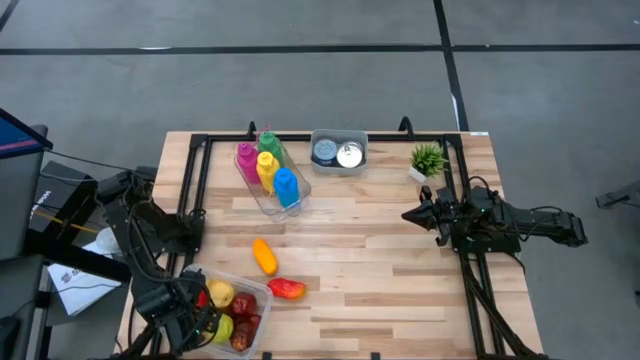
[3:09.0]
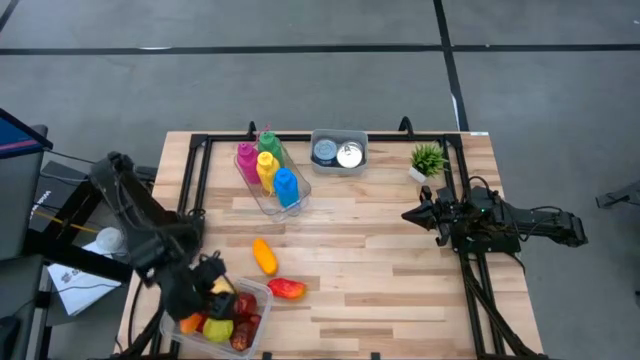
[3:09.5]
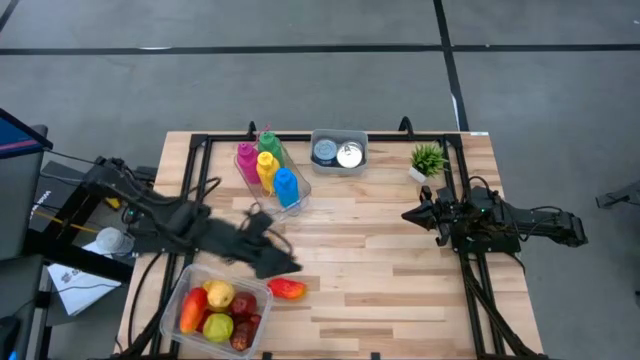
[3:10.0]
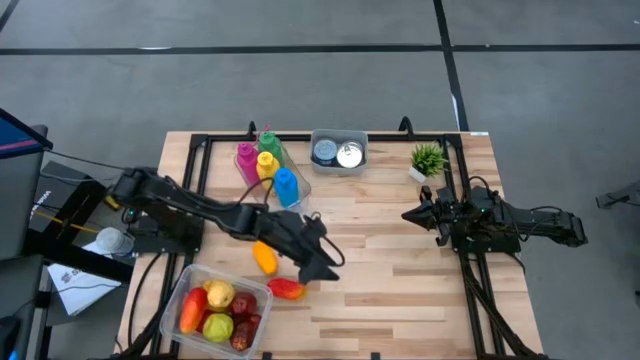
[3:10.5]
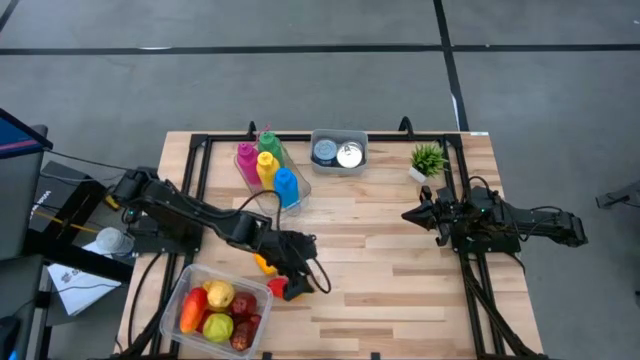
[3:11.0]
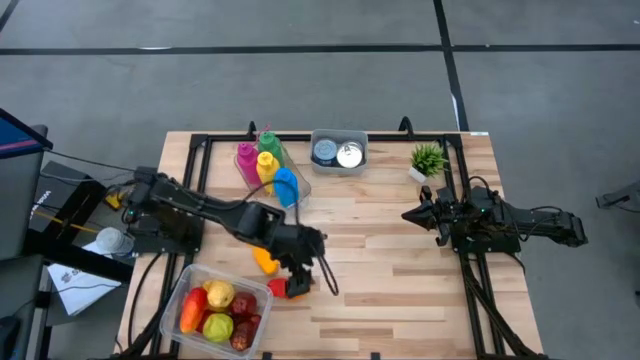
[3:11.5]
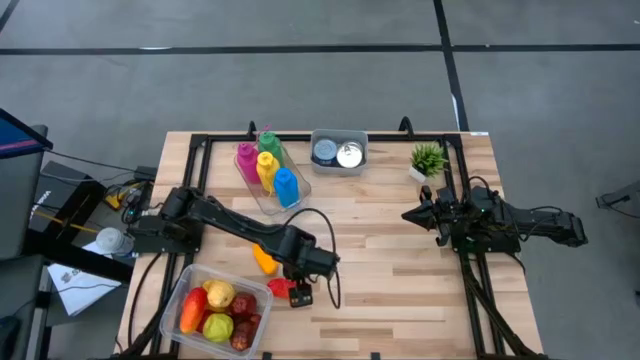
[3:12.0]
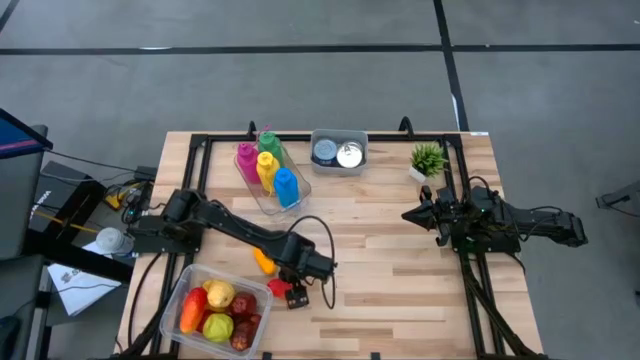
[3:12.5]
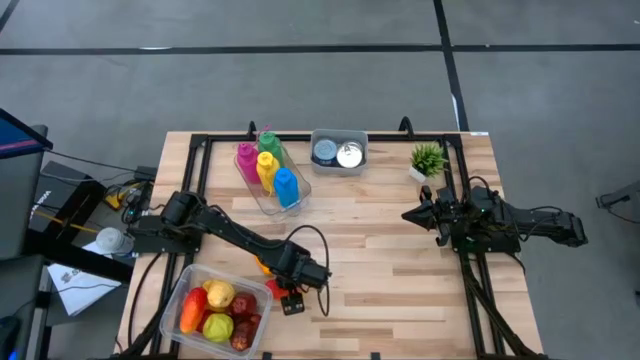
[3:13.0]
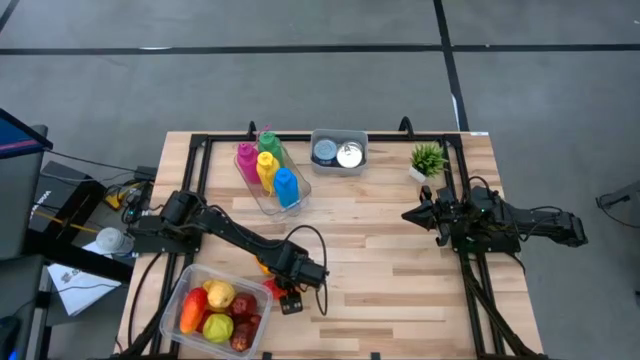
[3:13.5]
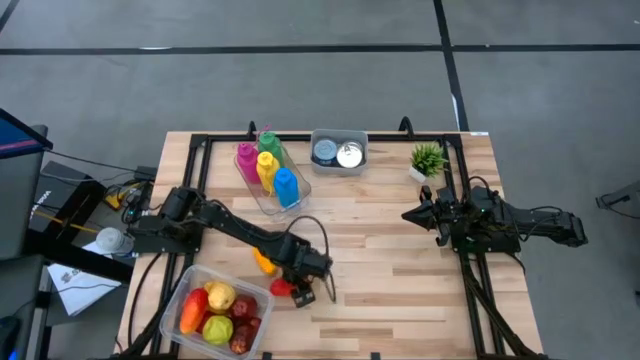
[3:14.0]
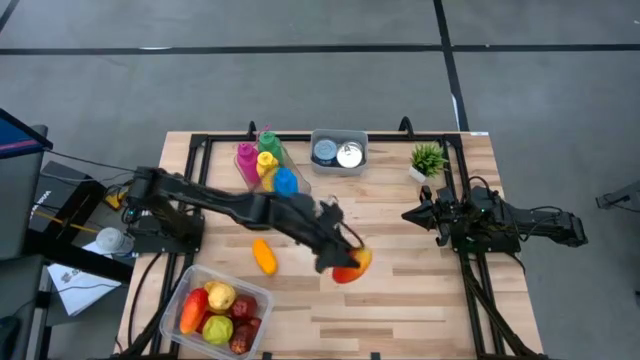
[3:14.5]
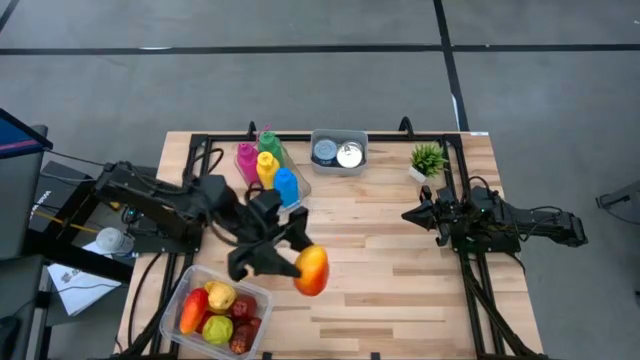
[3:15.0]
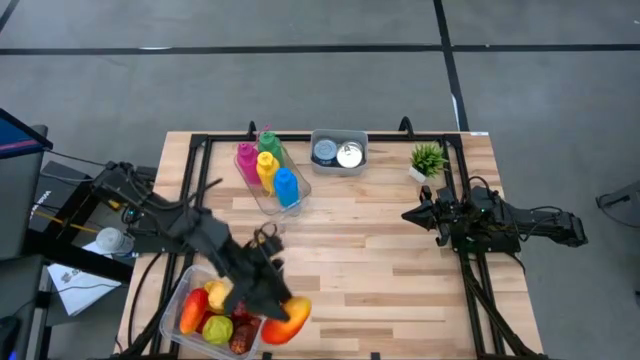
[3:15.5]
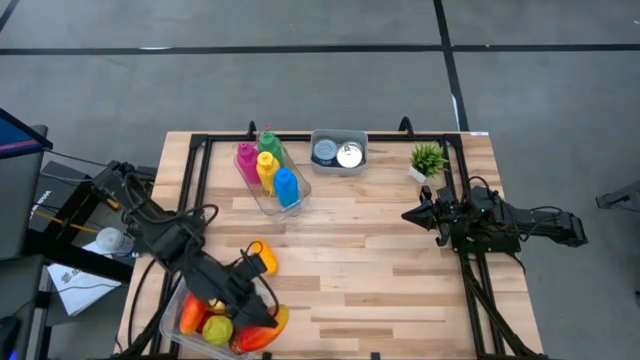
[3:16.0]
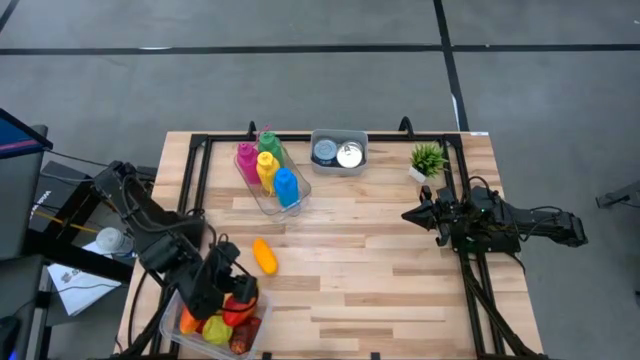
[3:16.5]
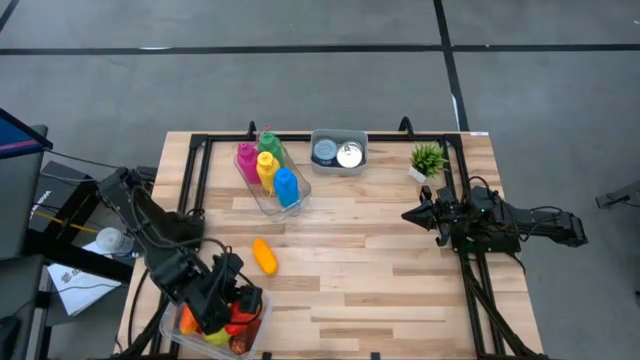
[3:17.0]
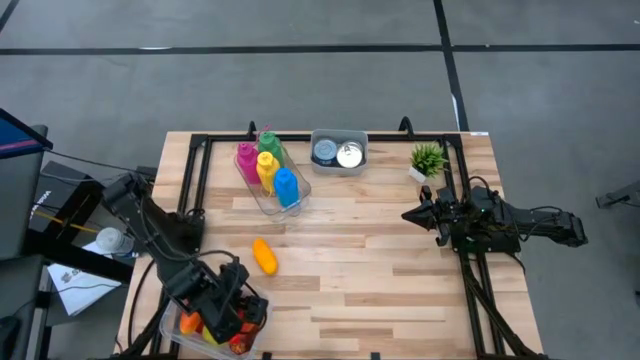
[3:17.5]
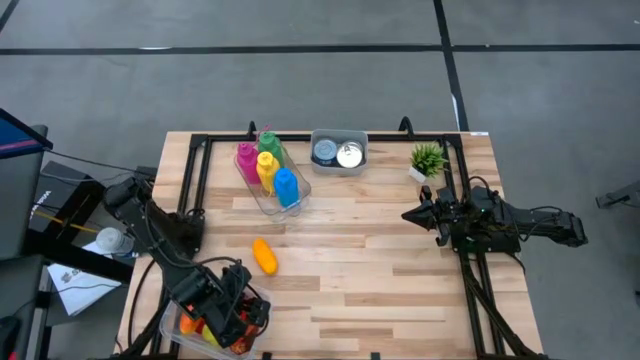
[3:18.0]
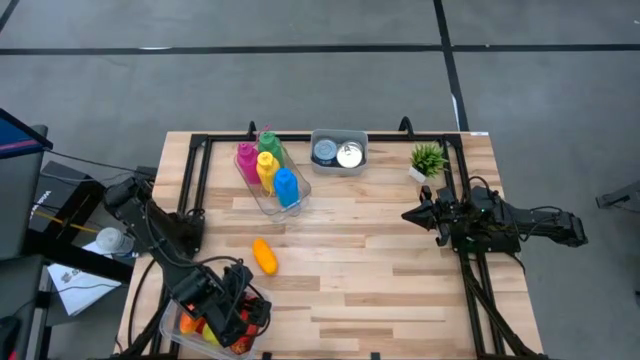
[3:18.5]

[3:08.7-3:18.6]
Task: Pick & Place Food Item
Put the red mango into the white bin

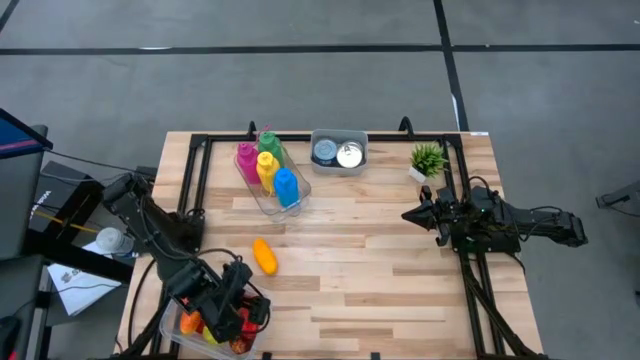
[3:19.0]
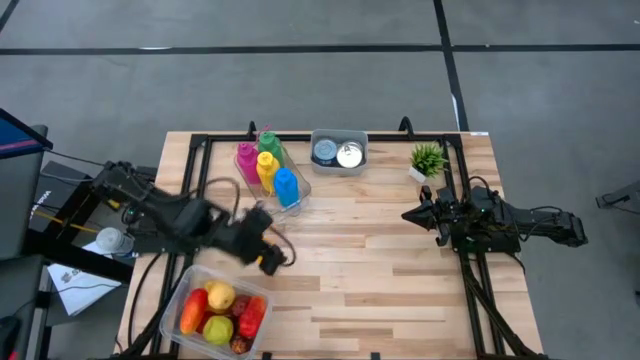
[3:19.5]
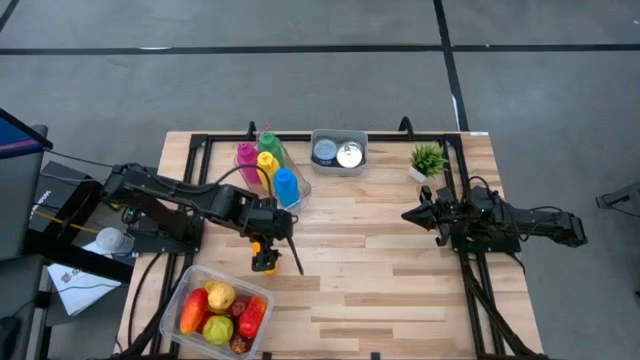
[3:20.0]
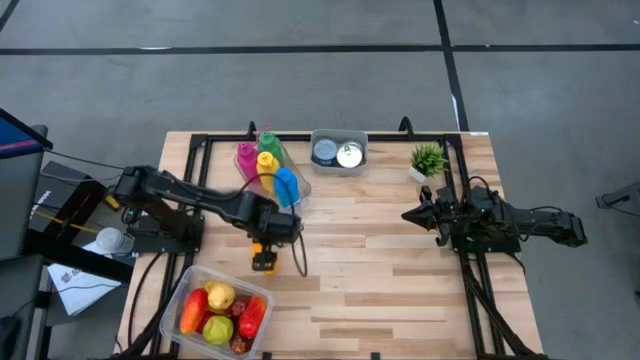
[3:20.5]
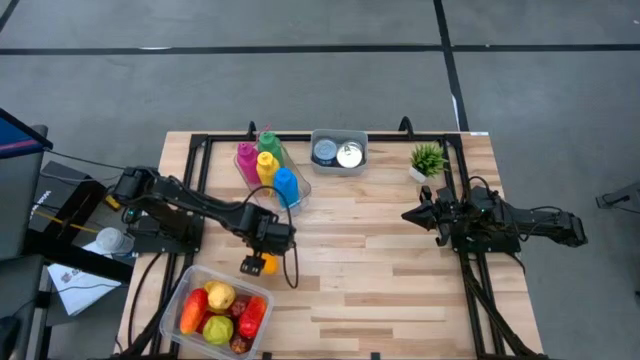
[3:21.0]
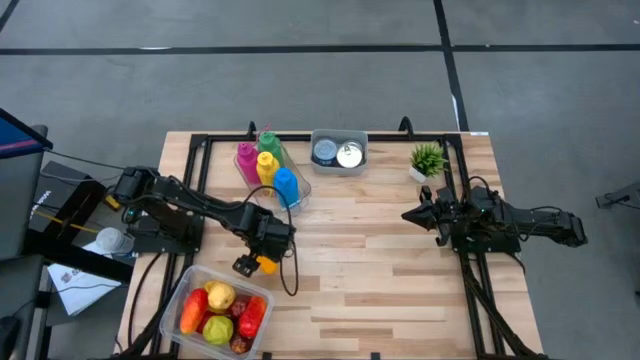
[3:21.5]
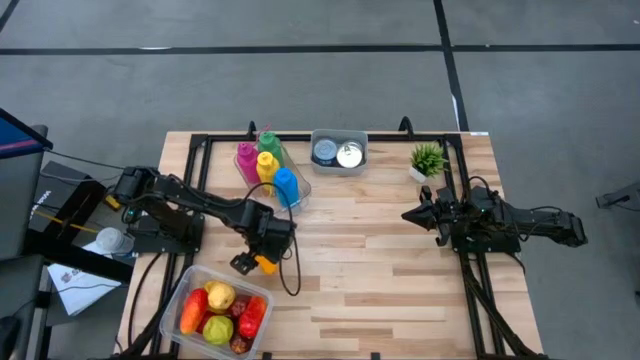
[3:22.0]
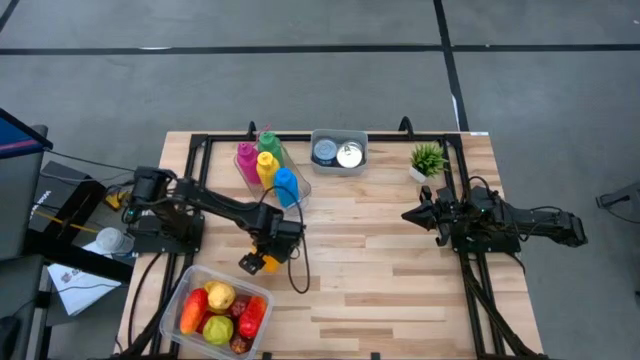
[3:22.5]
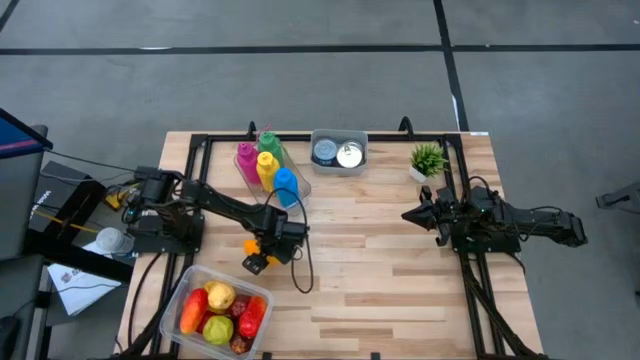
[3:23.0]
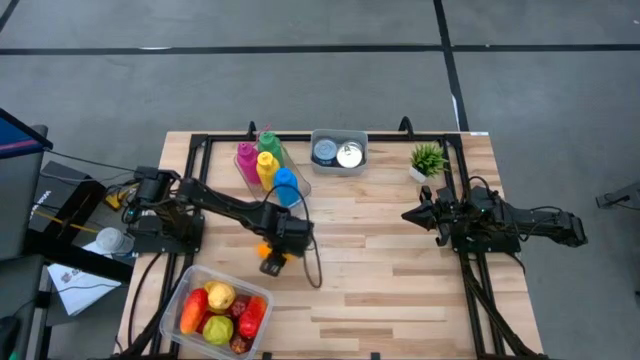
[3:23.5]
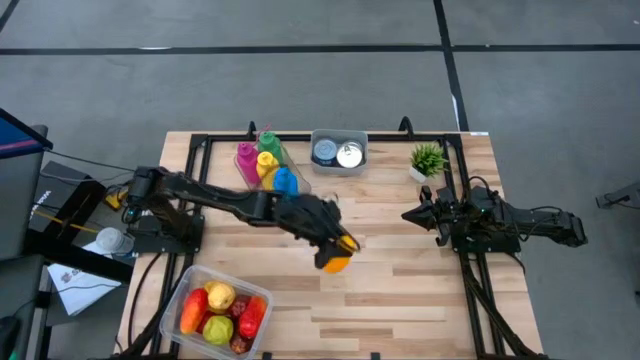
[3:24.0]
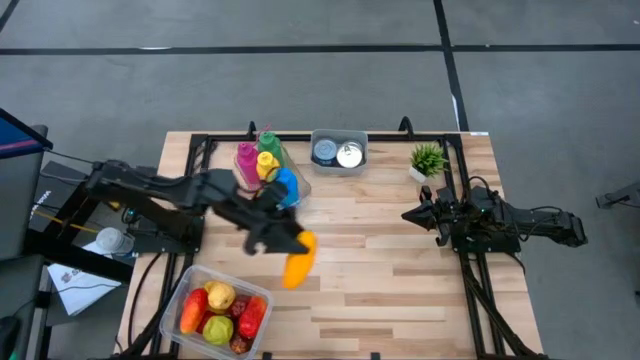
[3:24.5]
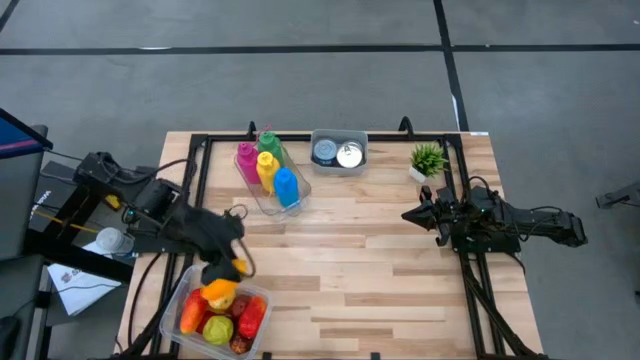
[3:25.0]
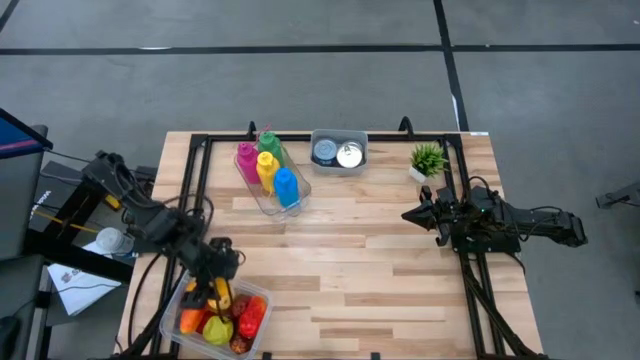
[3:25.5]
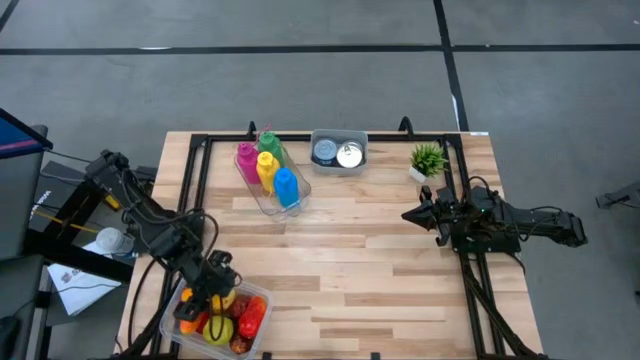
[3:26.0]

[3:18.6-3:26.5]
Put the yellow mango into the white bin

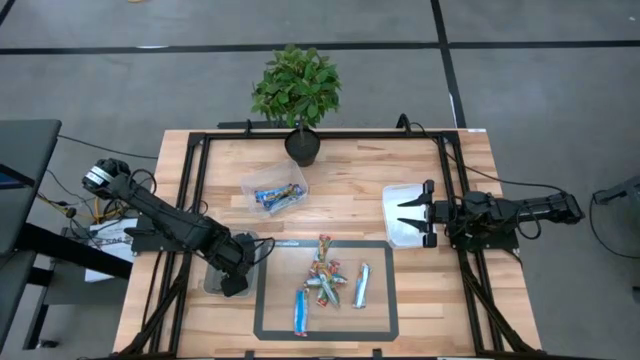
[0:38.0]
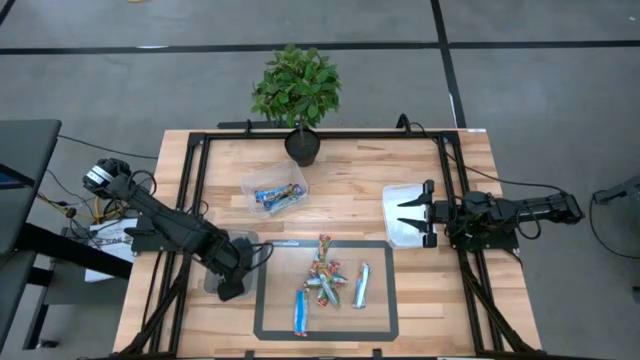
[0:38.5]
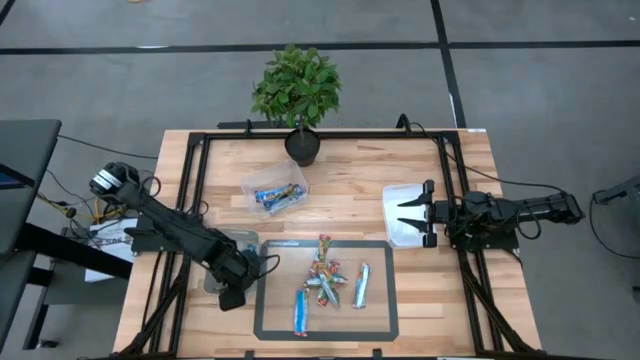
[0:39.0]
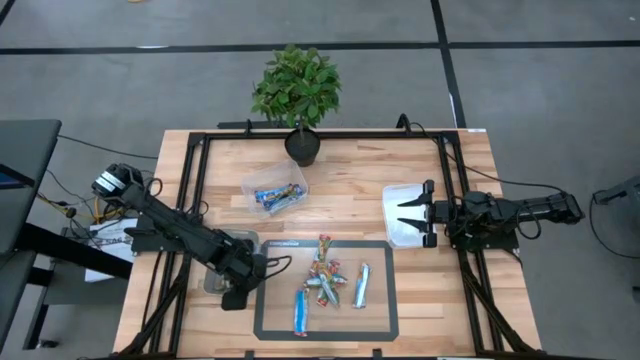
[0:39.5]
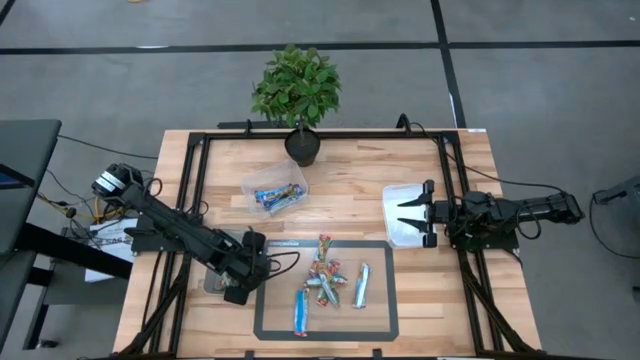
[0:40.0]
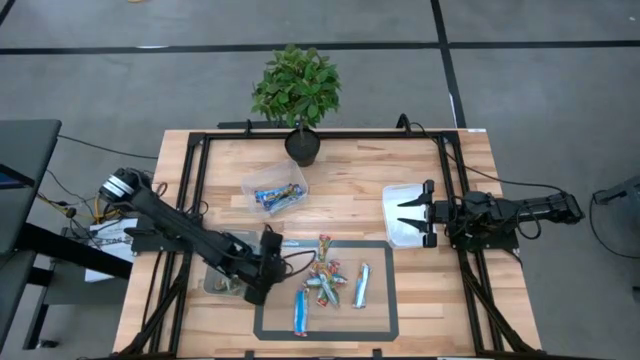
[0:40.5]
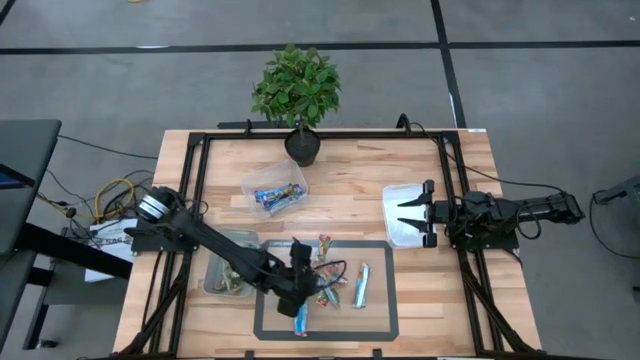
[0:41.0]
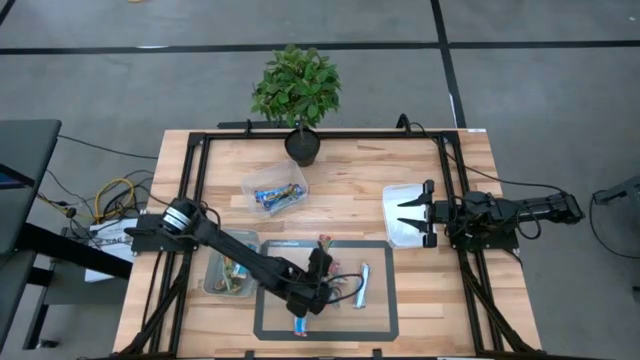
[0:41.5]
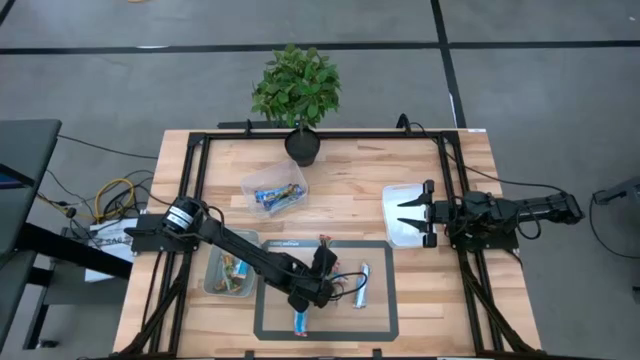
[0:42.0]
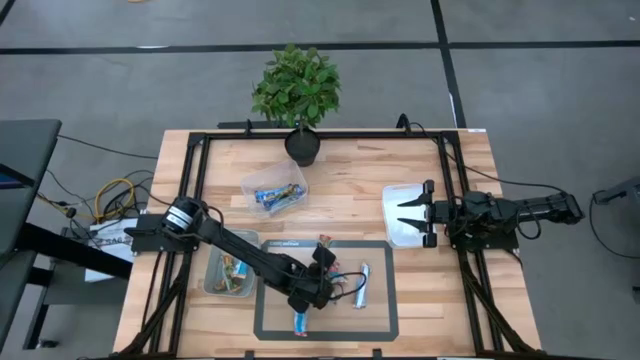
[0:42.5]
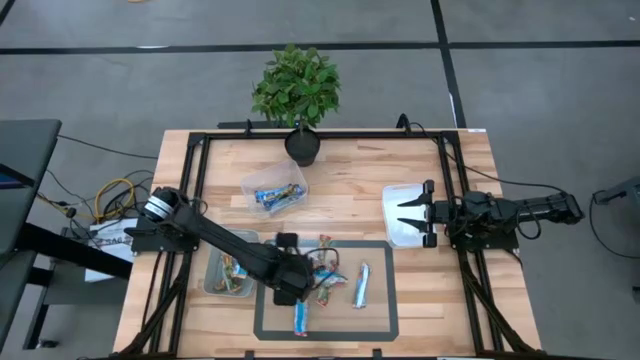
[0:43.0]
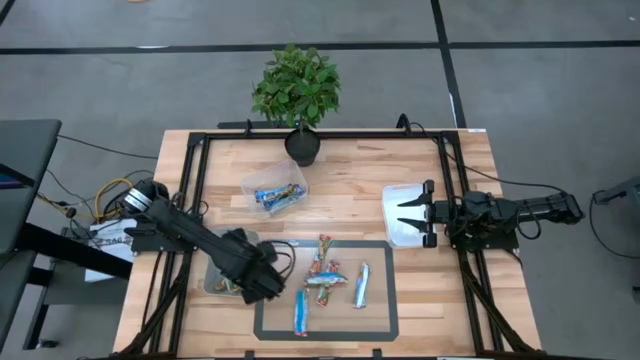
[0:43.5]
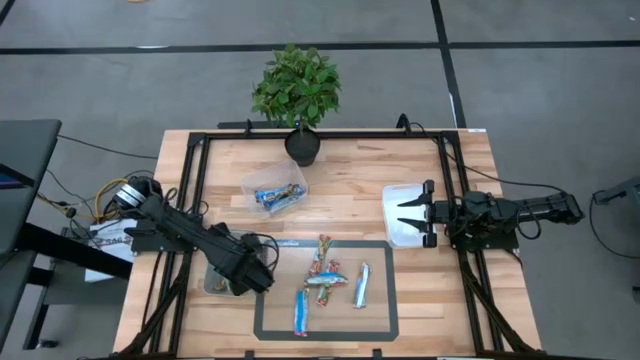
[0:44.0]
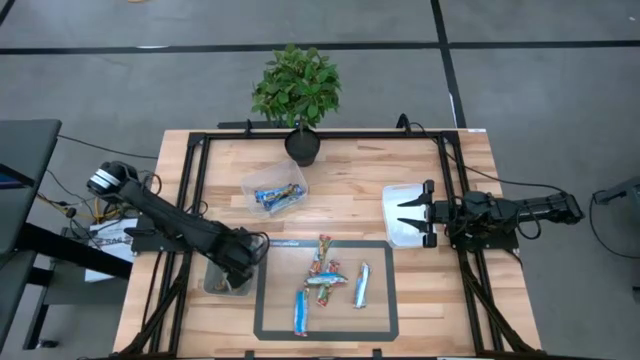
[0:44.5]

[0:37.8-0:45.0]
Task: Pick and place Granola Bars by type
Put the yellow granola bar into the gray bin
